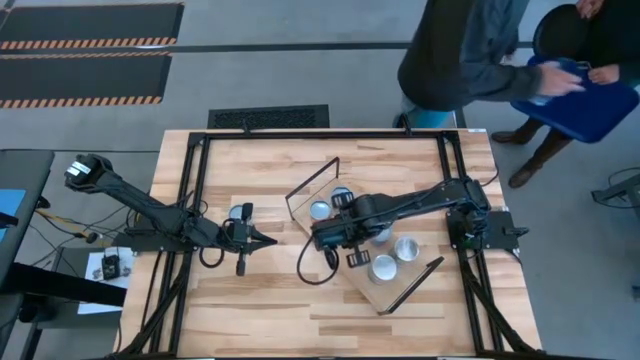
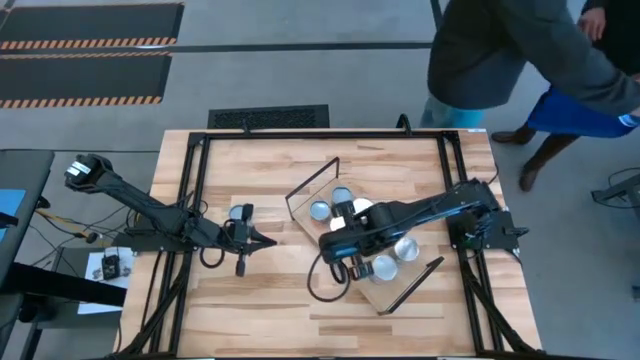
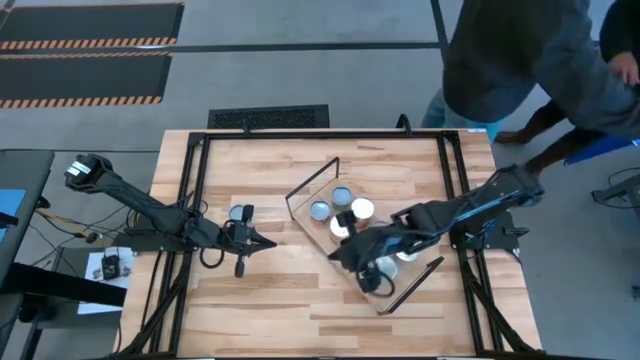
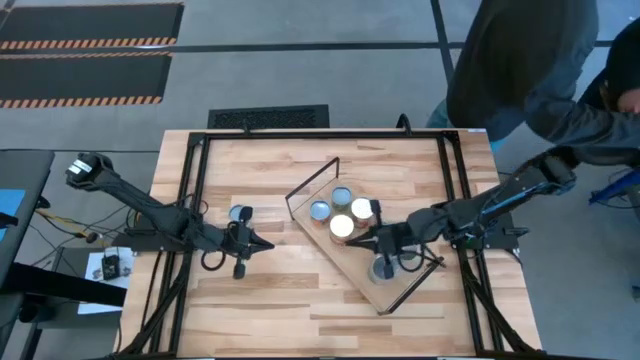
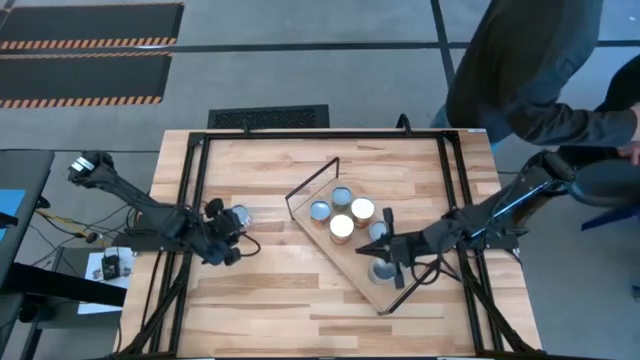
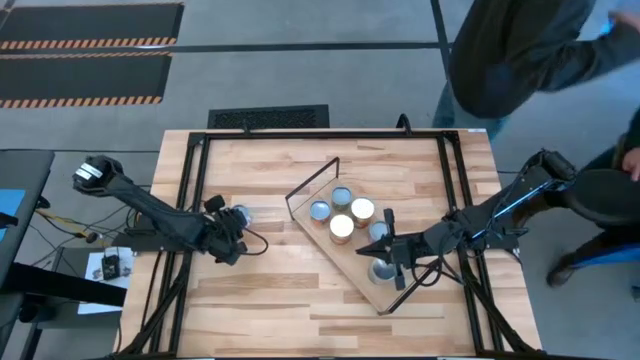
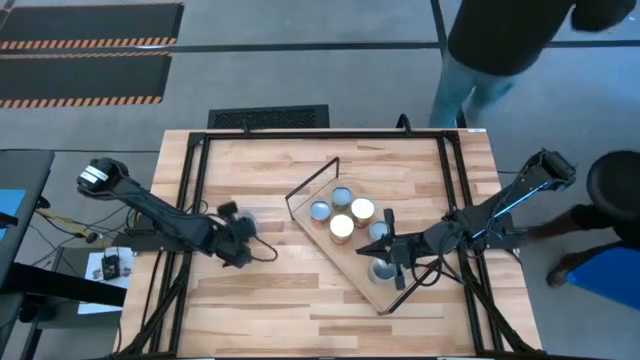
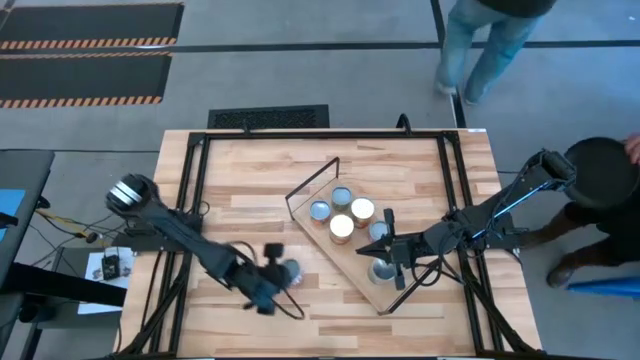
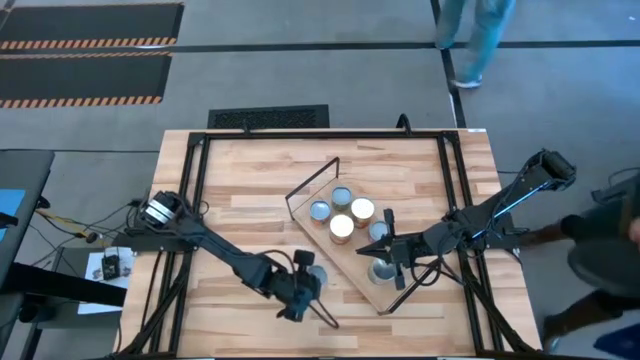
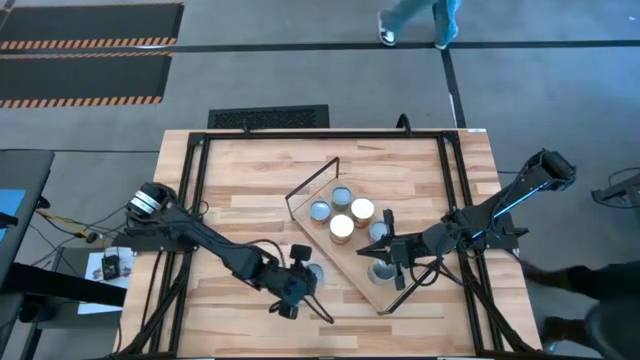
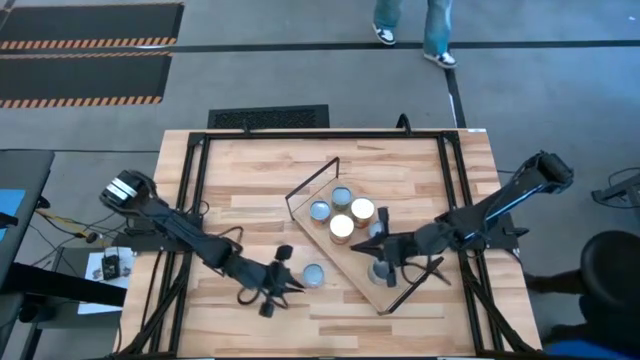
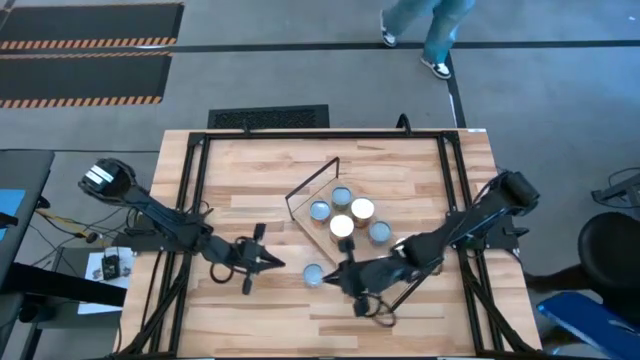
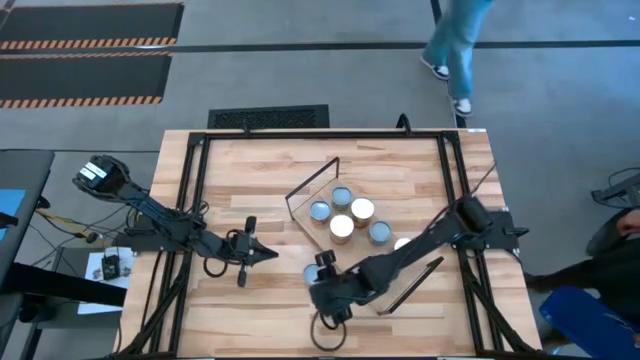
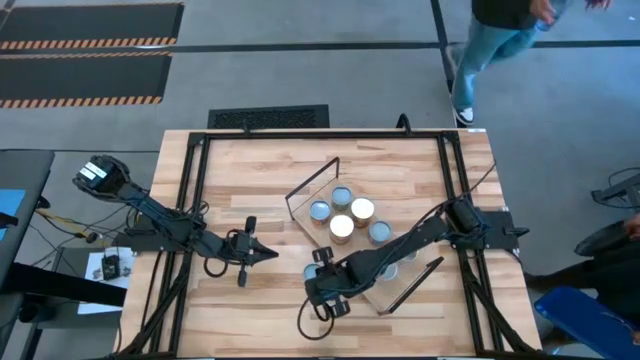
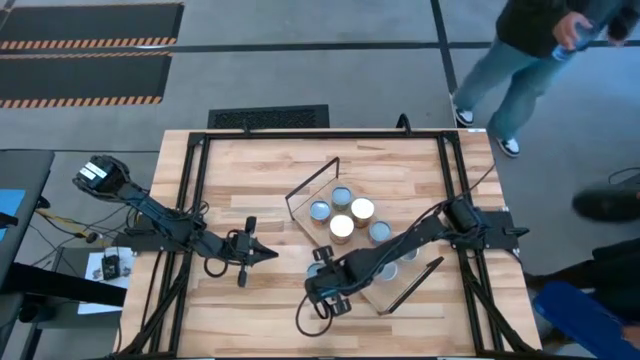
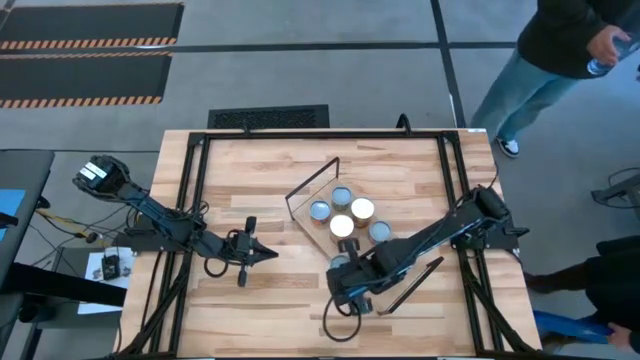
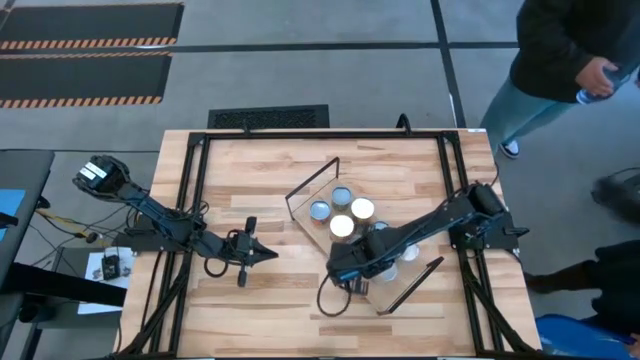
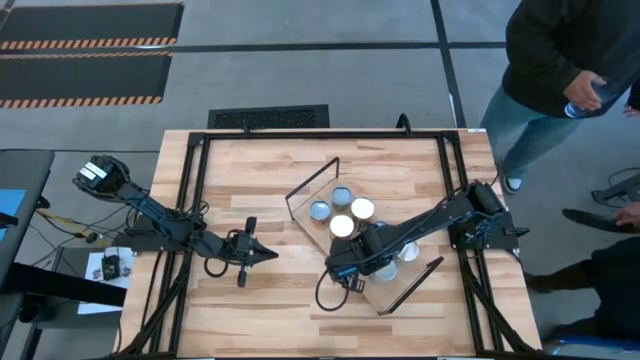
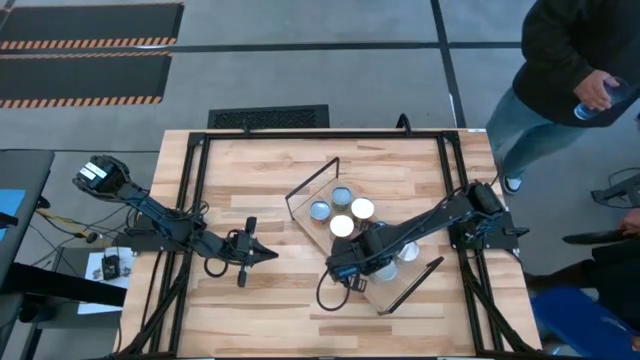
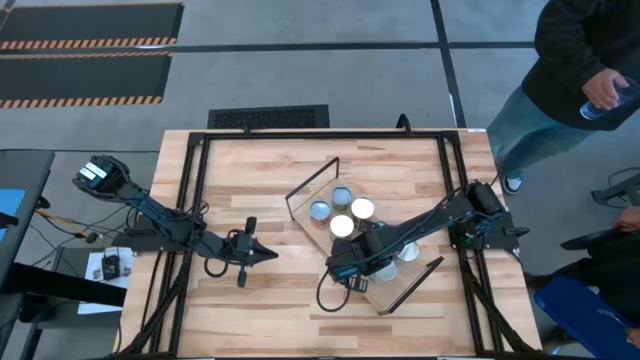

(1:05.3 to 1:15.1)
Task: Pick and place cans onto a shelf
Put the small canned carrots on the shelf aligned with the other small canned corn

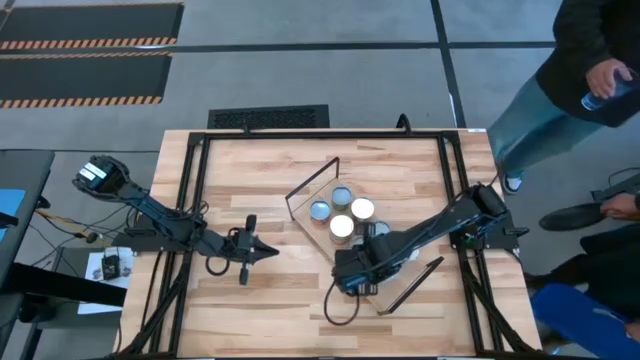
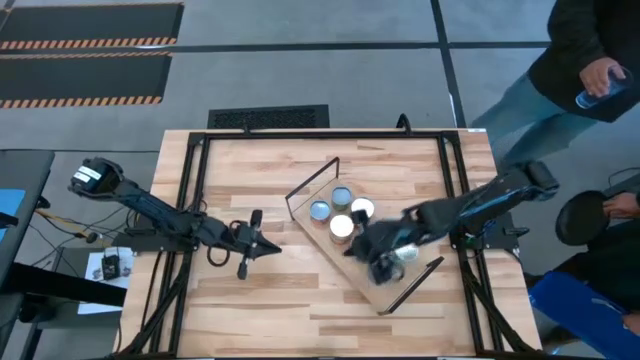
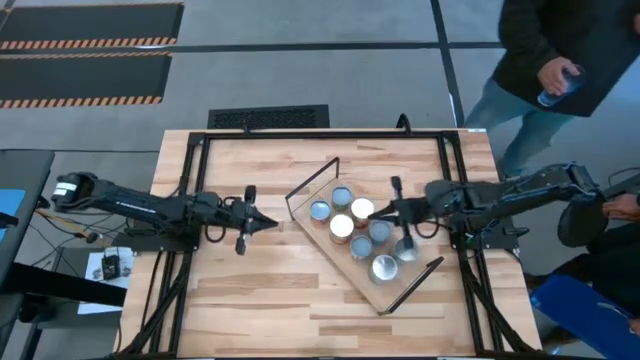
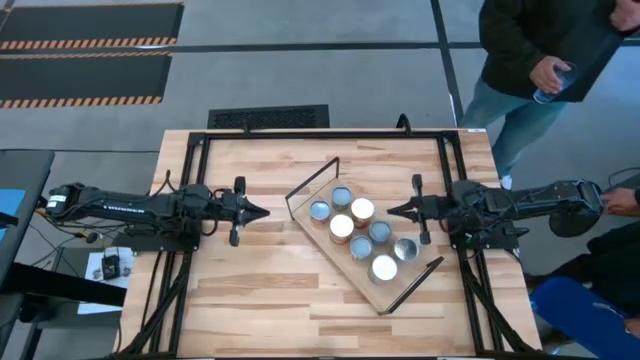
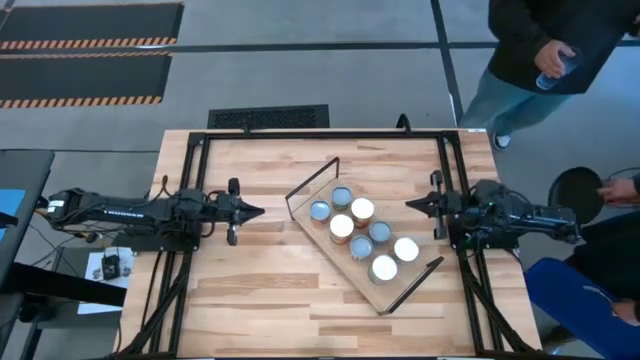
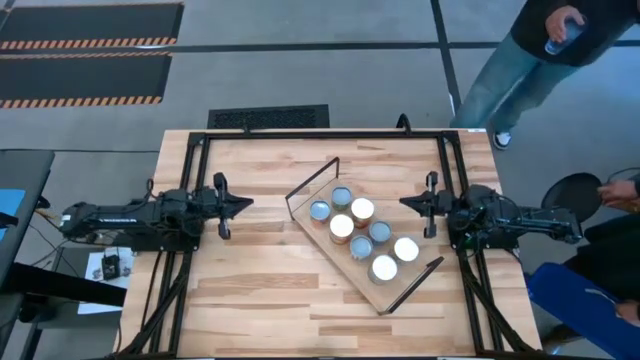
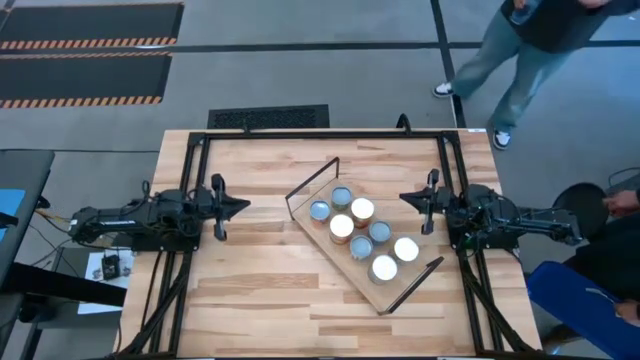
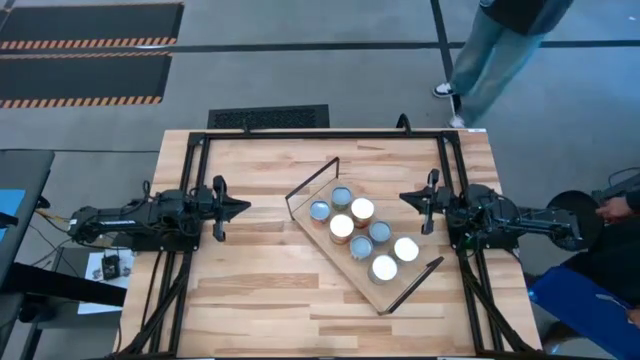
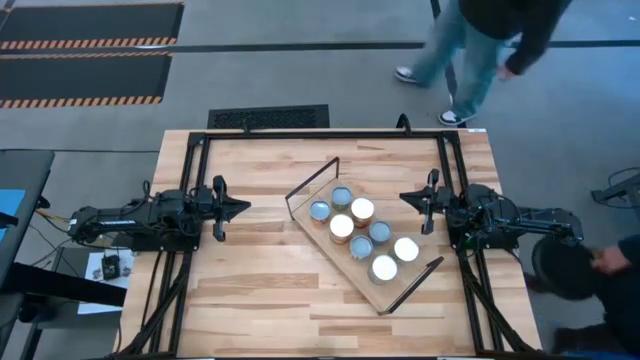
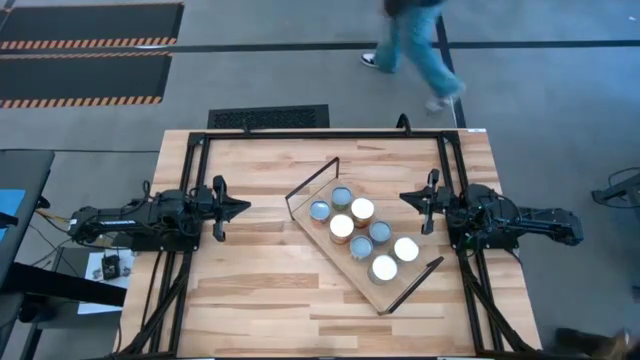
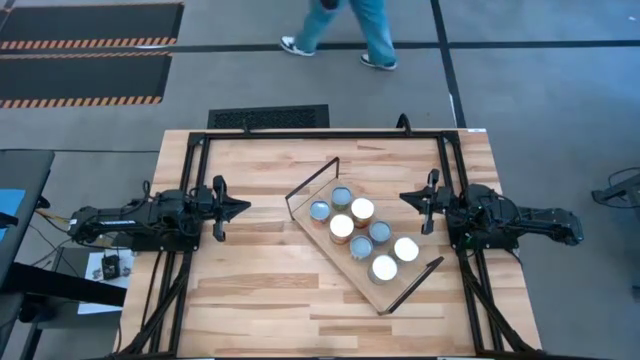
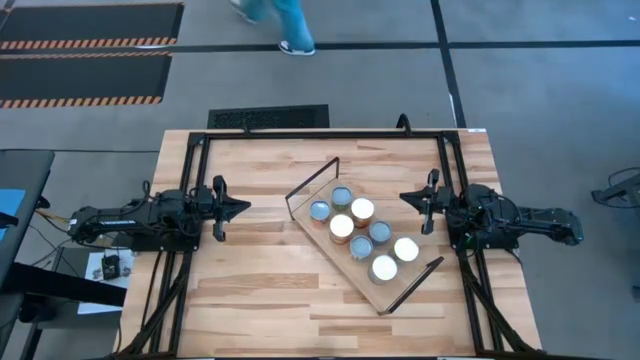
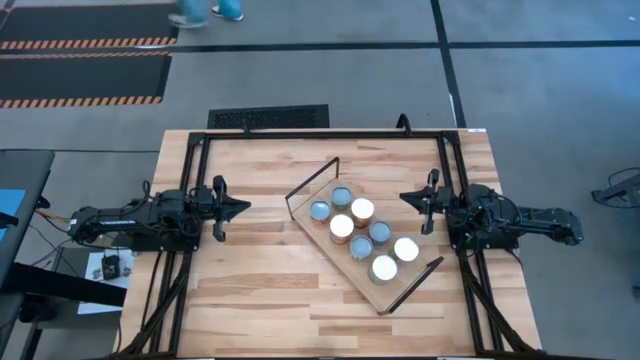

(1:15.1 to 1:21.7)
Return to Home Position

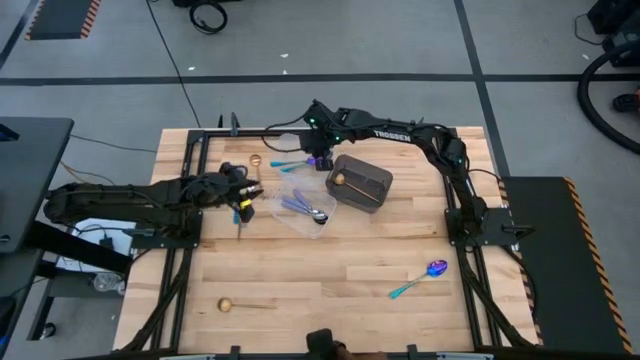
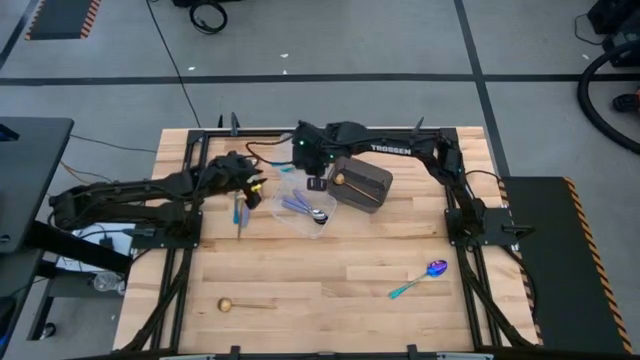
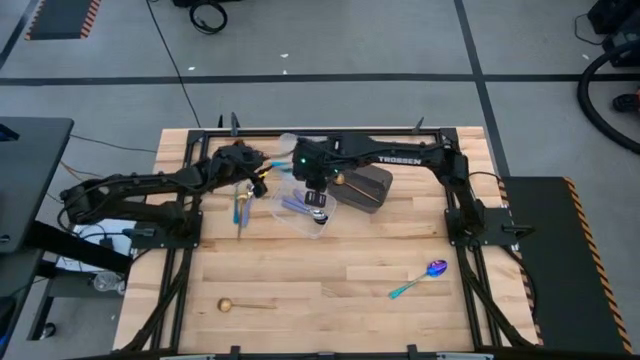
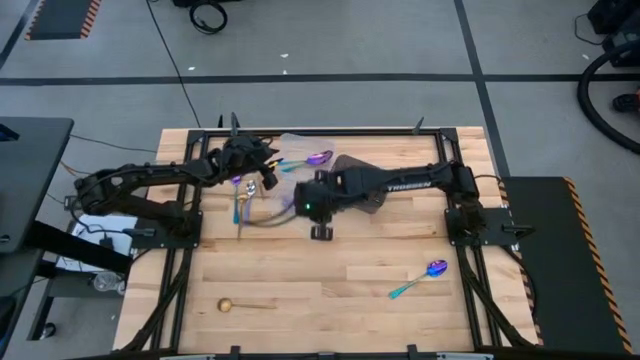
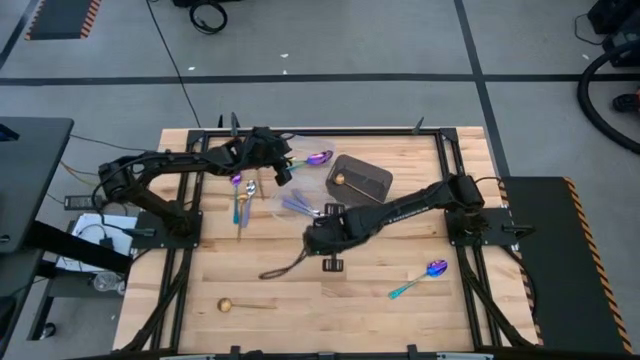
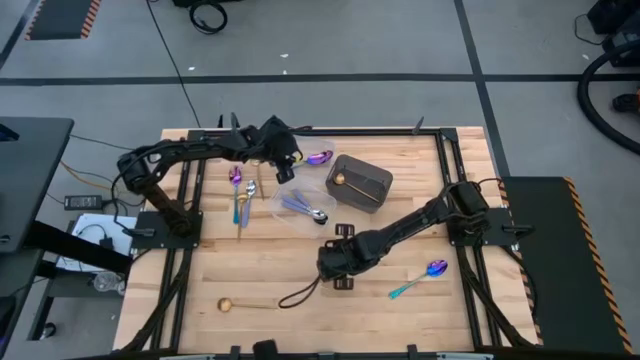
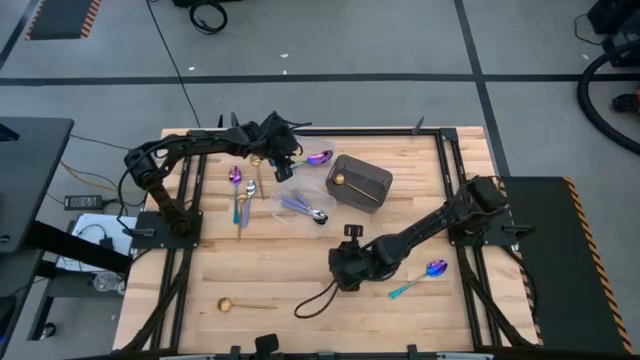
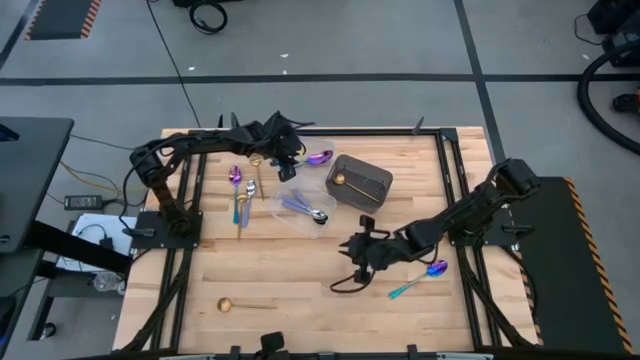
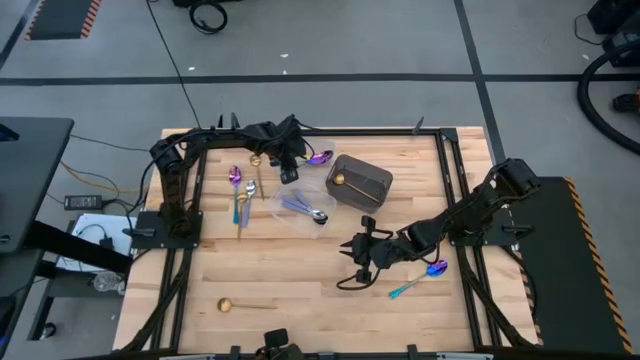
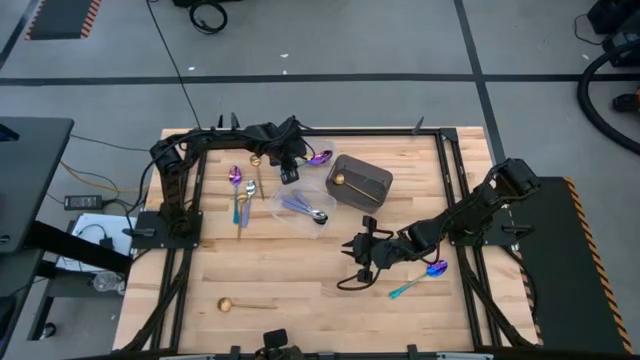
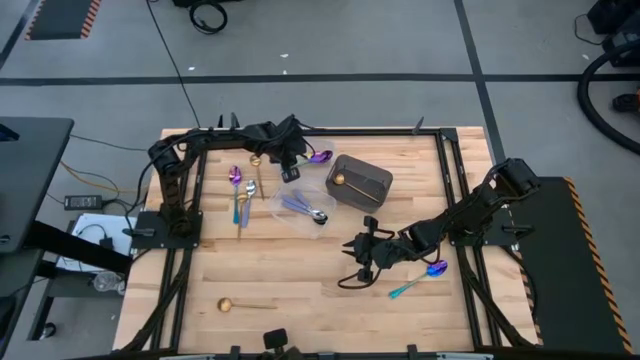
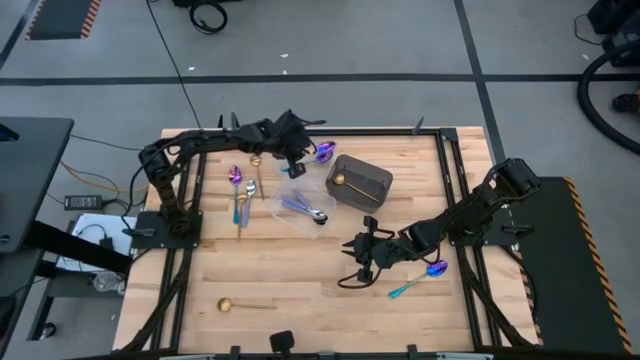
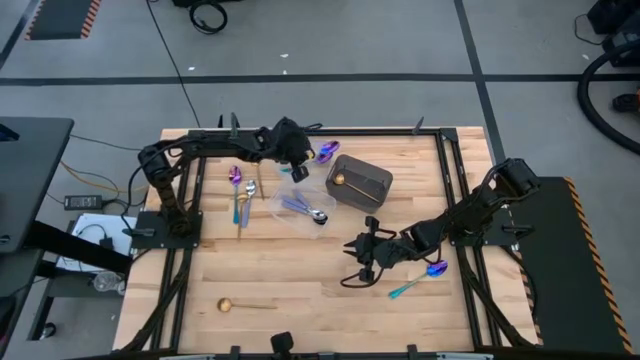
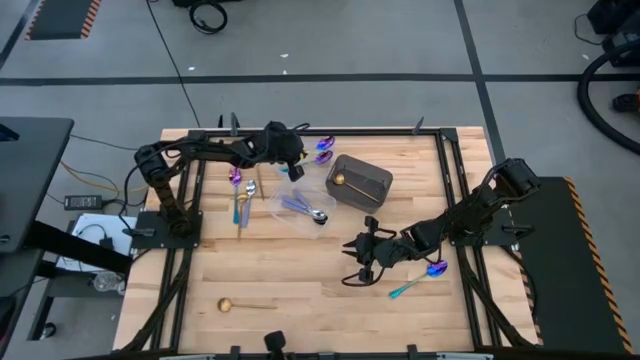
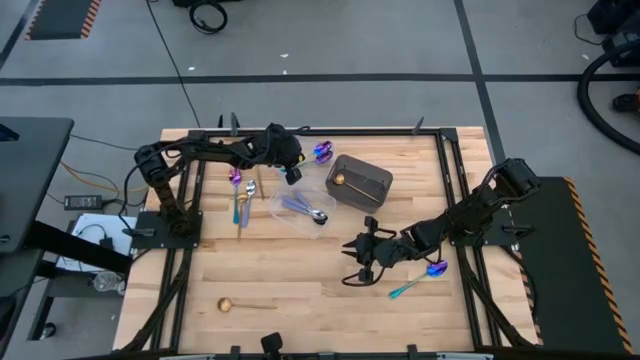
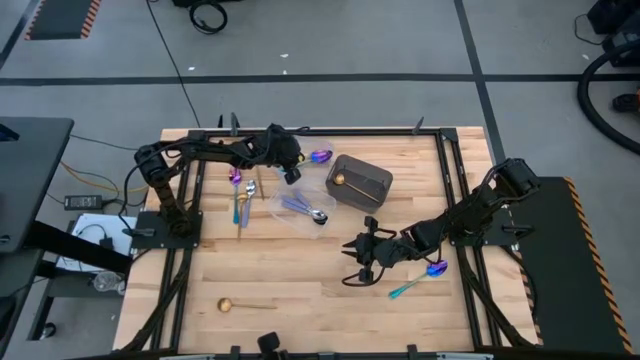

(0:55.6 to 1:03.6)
Task: Sort silverware by color (type)
Adjust the blue spoon in the top transparent bin
